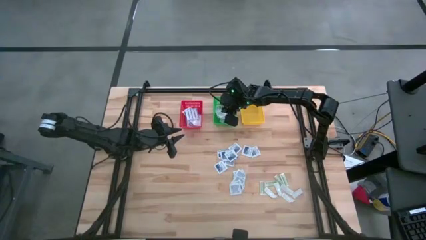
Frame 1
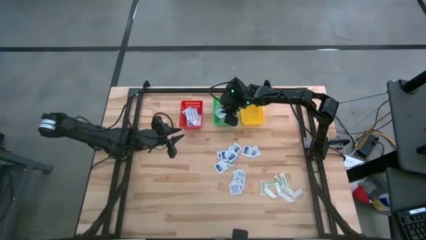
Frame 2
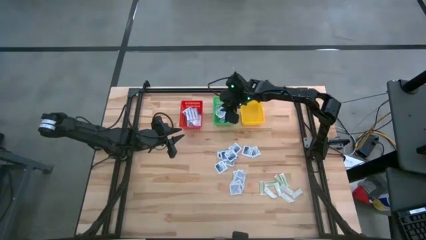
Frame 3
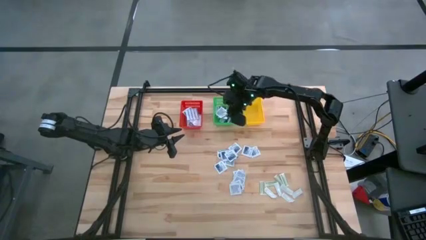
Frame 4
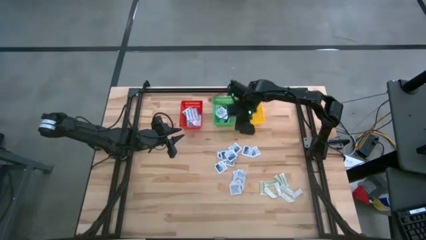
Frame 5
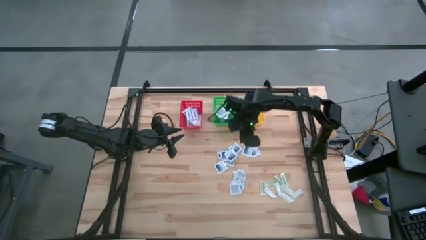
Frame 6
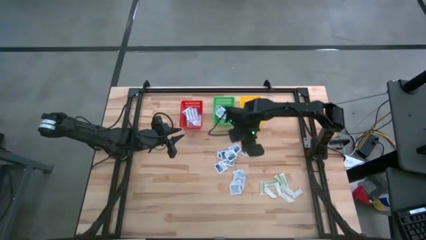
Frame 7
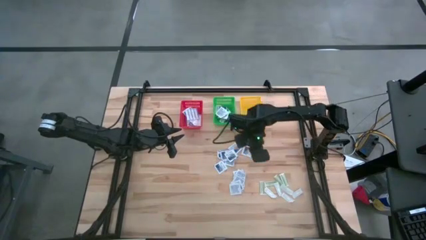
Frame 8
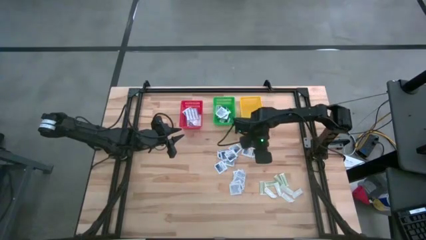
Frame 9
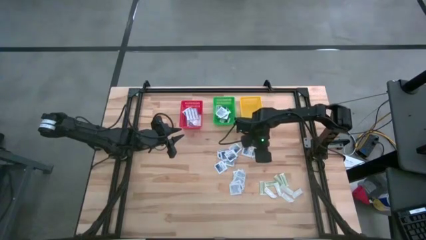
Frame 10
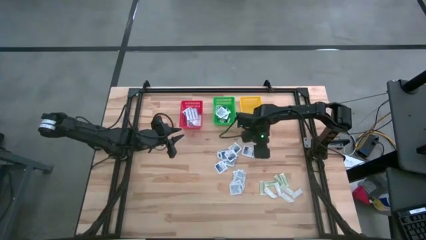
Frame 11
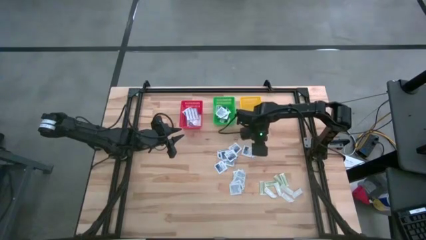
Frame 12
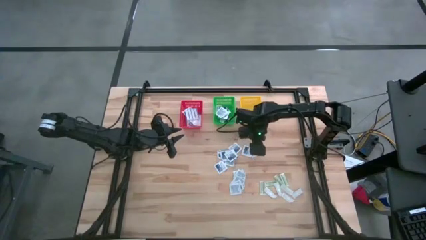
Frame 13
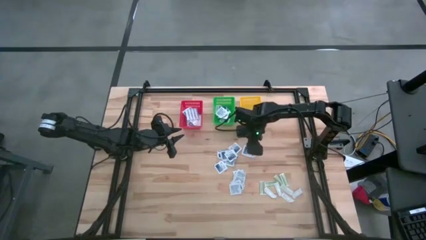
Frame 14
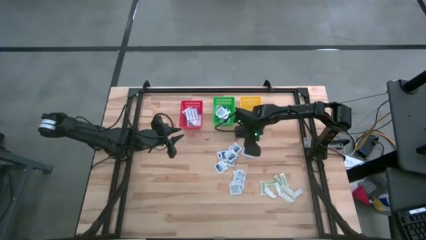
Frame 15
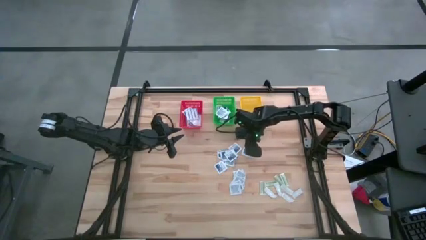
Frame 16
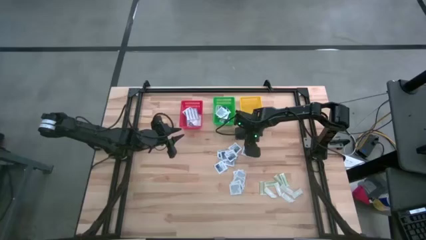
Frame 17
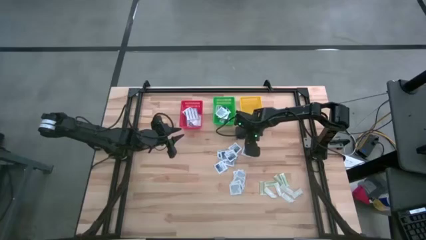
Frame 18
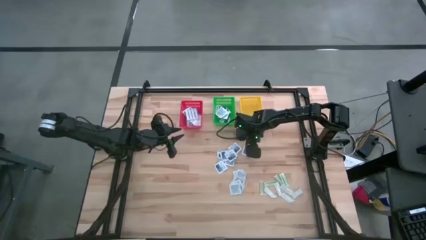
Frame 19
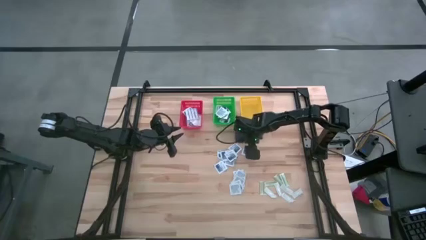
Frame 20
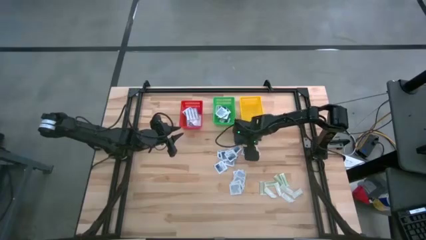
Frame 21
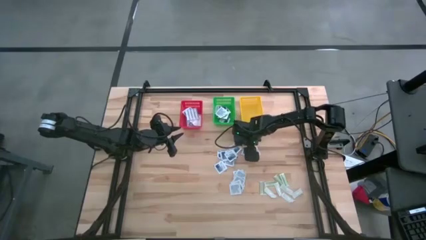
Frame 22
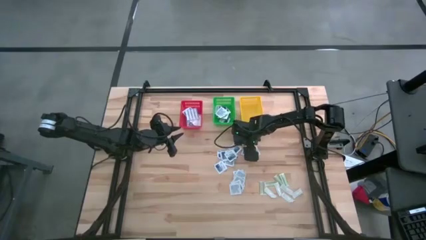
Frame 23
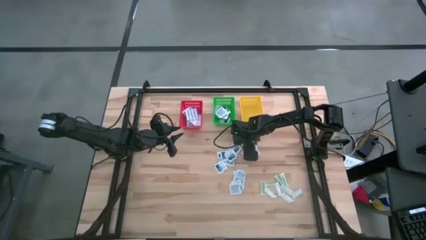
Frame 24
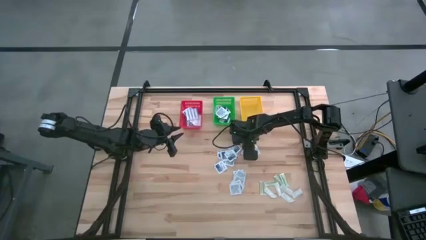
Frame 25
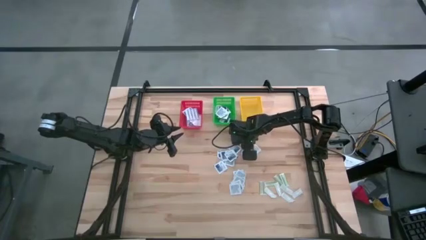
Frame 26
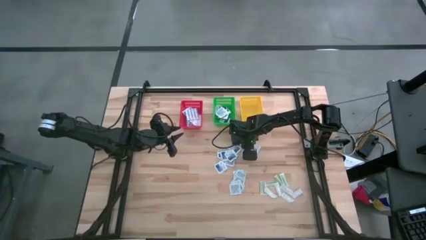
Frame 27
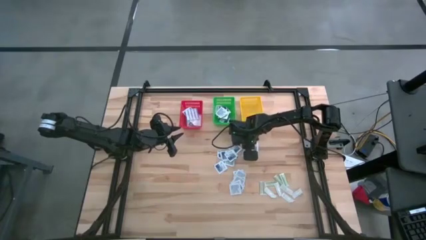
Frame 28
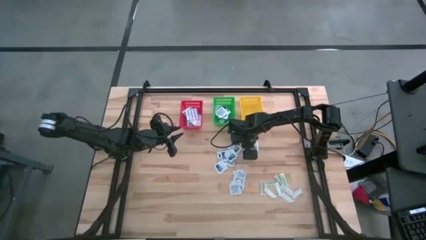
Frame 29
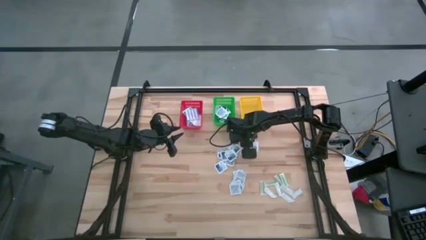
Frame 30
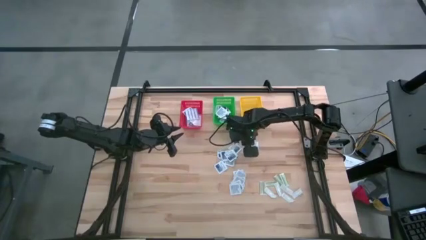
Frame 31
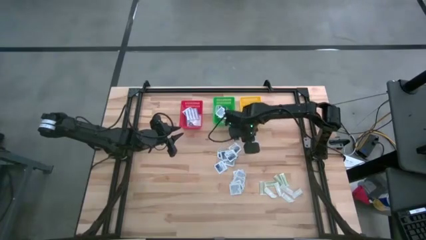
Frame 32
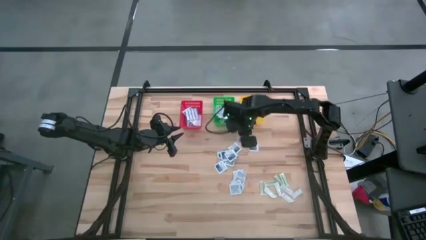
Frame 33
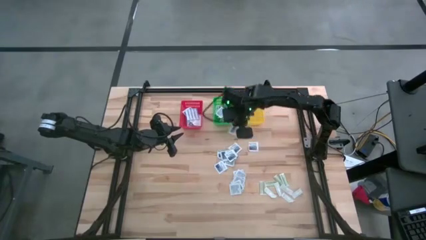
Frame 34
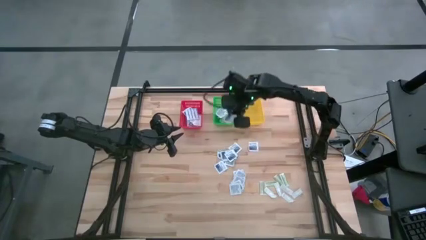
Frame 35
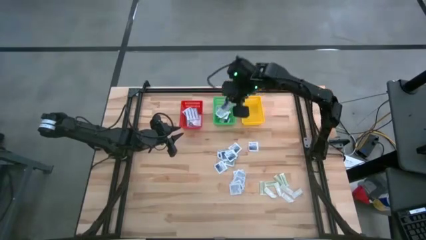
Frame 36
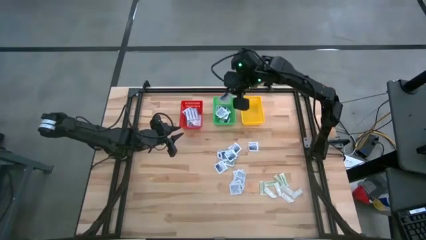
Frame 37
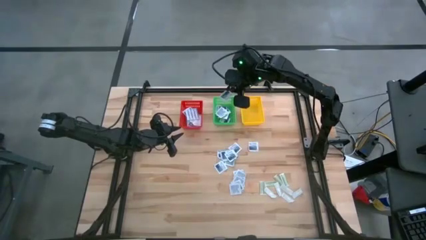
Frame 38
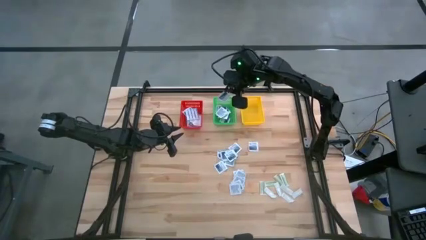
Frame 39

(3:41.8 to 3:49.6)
Task: Pick & Place First Aid Supplies
Put the alcohol pad into the green basket

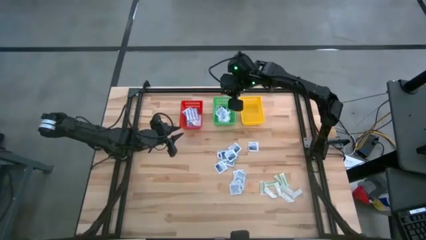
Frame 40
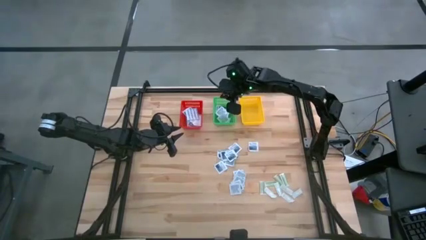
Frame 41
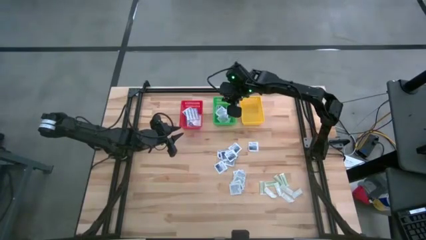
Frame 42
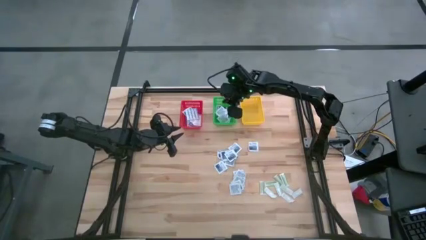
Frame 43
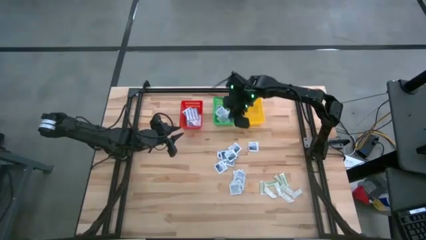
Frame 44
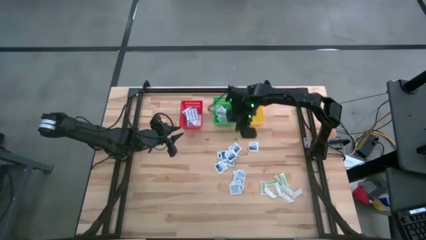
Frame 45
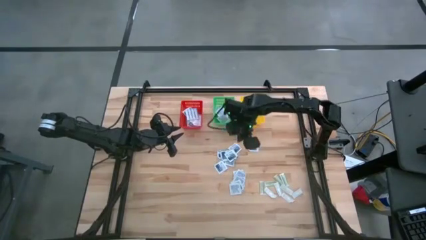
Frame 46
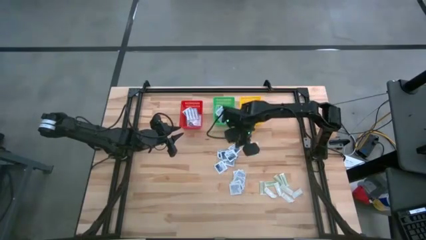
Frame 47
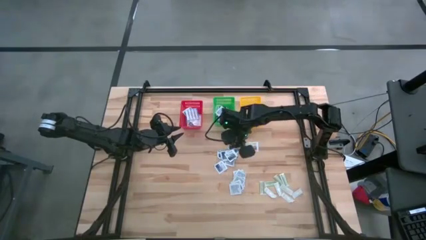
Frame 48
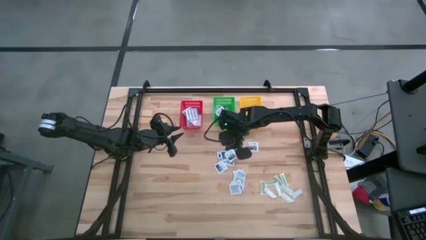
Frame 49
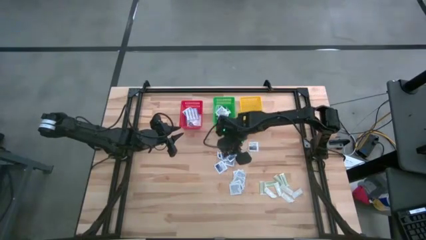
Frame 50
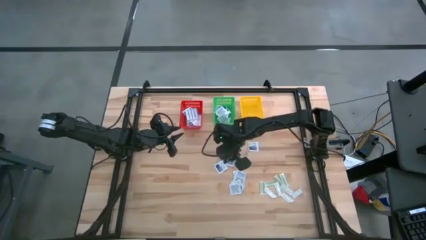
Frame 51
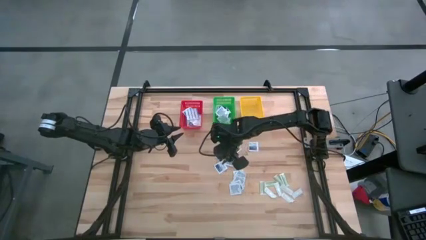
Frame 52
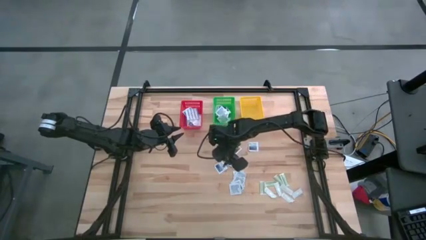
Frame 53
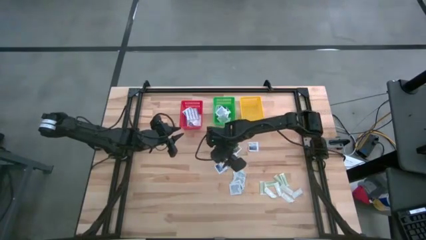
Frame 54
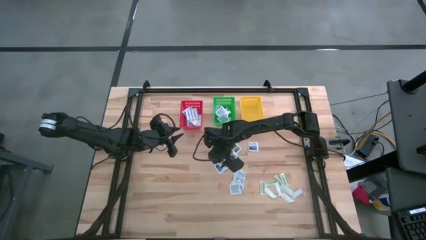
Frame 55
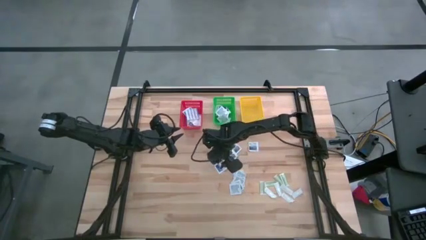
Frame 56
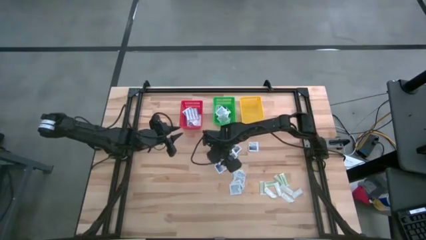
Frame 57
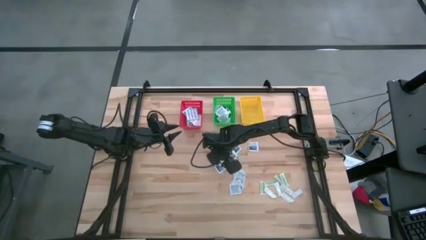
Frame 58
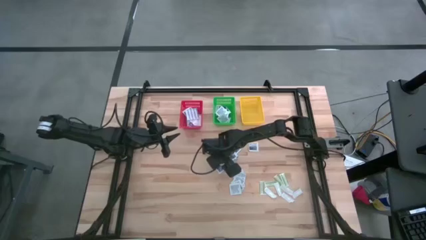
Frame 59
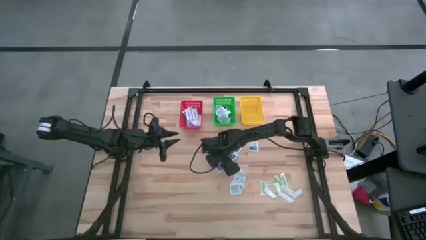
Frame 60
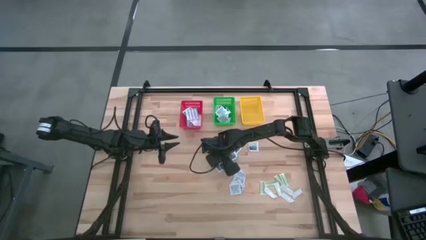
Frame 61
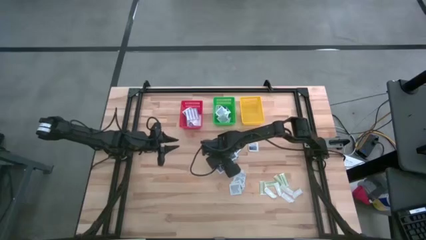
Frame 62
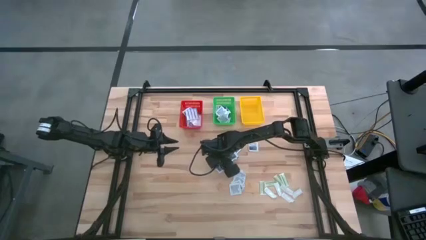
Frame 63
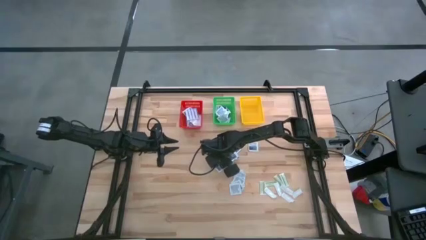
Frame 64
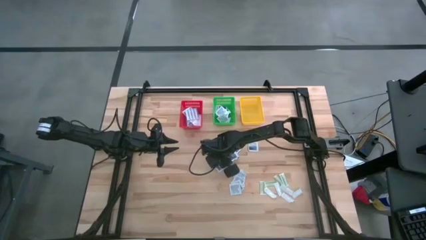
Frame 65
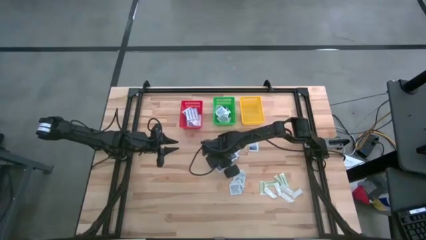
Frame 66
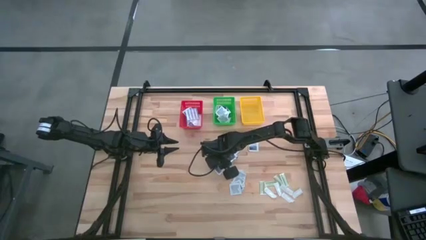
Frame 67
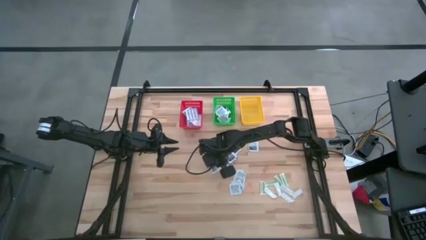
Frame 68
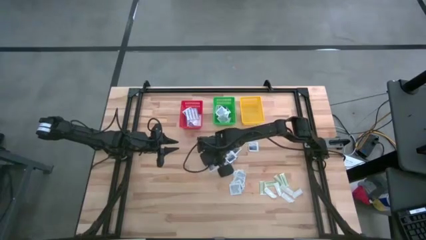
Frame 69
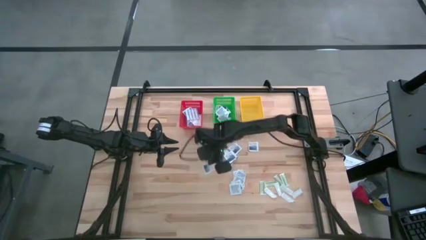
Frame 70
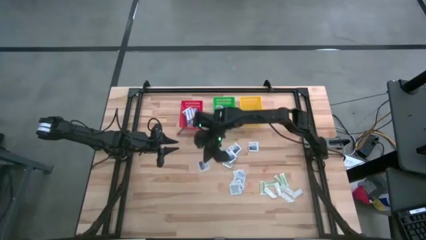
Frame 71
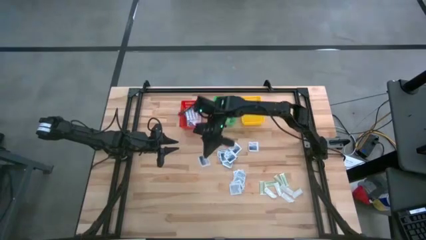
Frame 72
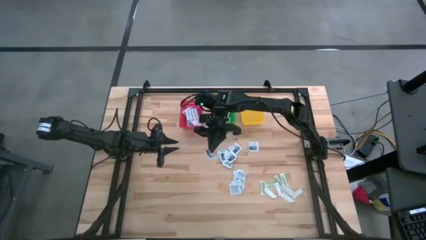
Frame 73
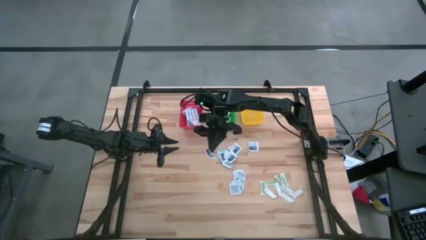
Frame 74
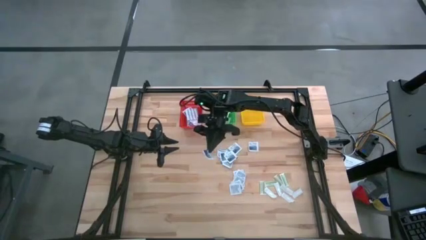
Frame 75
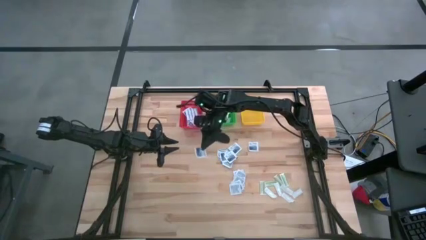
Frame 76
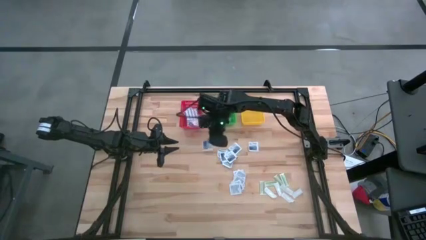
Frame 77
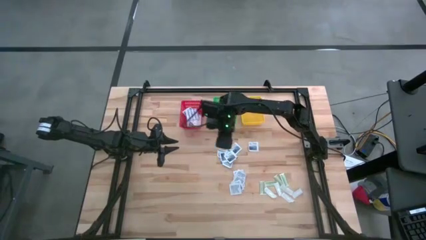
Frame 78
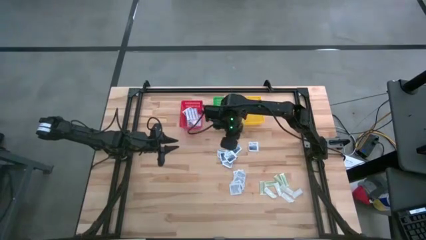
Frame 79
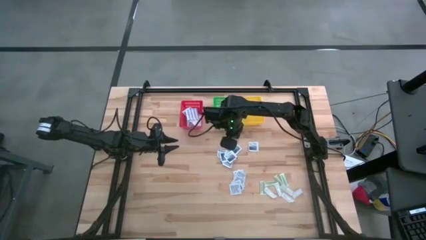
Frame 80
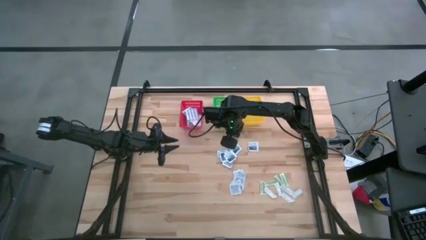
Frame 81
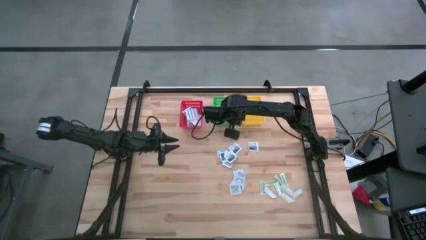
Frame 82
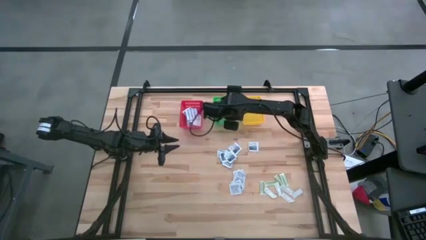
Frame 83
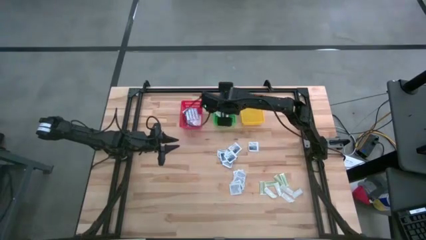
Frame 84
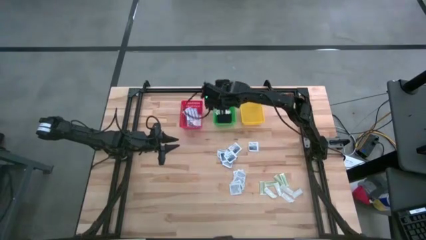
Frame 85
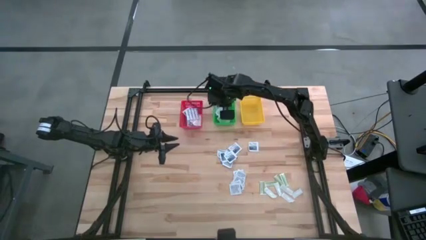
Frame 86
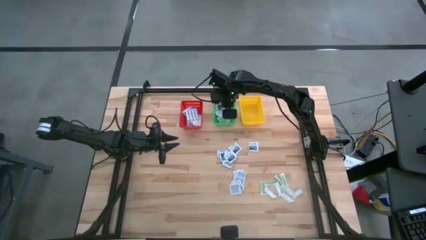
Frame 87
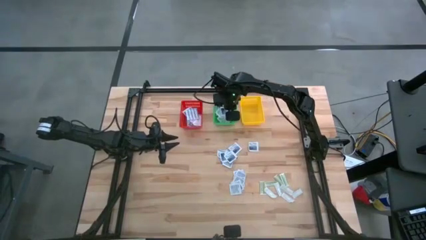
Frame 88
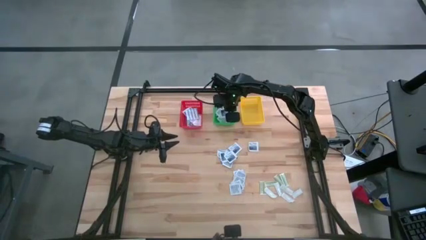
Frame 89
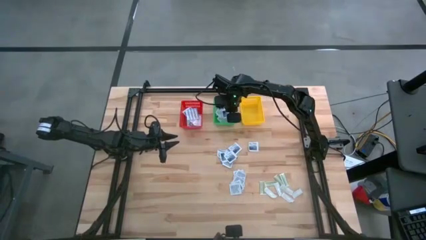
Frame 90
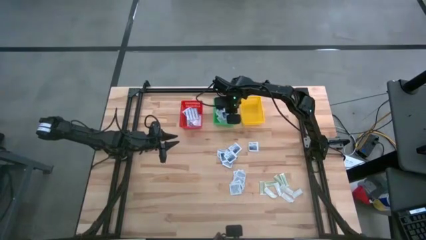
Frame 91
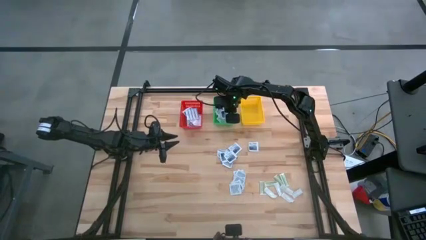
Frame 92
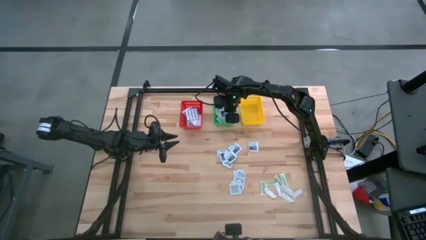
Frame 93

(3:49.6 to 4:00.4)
Put the alcohol pad into the green basket
